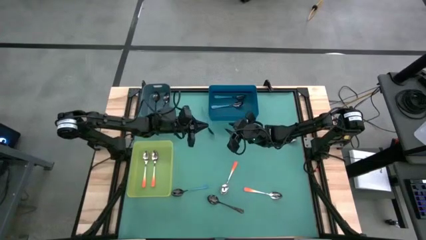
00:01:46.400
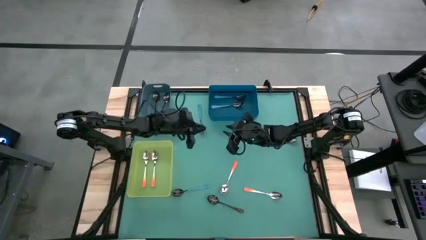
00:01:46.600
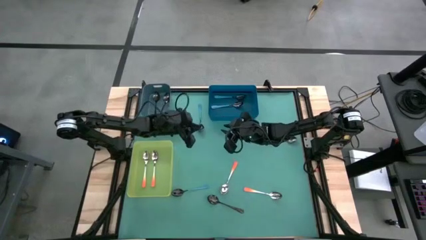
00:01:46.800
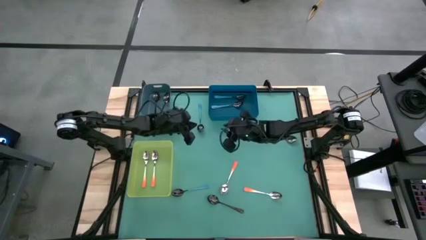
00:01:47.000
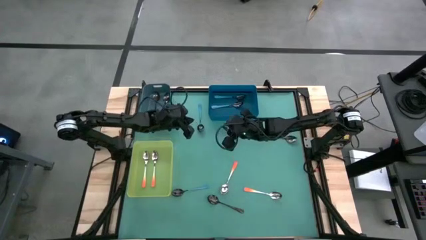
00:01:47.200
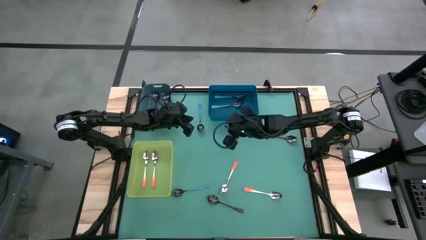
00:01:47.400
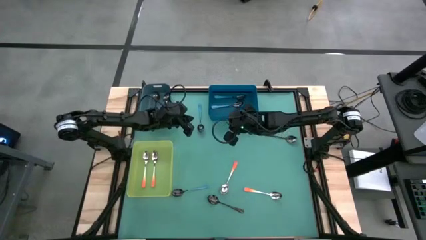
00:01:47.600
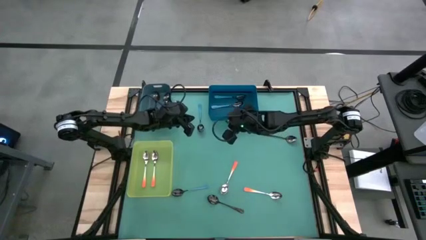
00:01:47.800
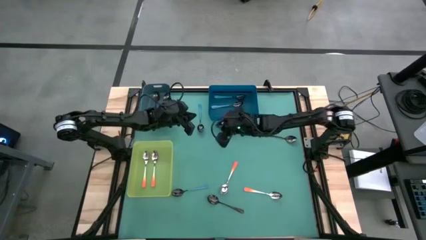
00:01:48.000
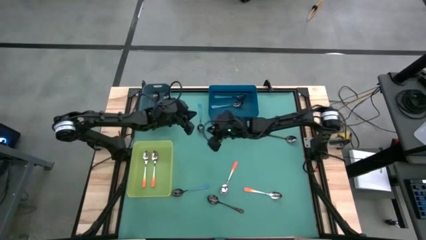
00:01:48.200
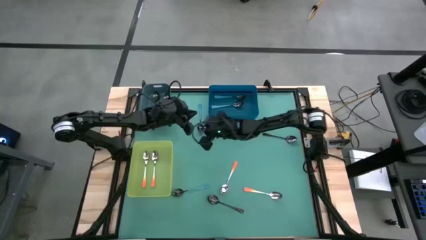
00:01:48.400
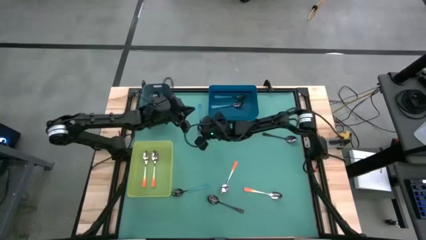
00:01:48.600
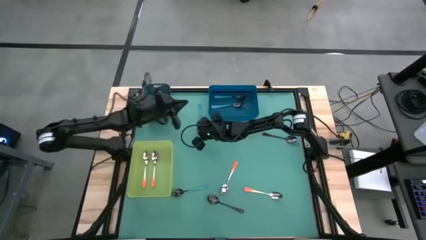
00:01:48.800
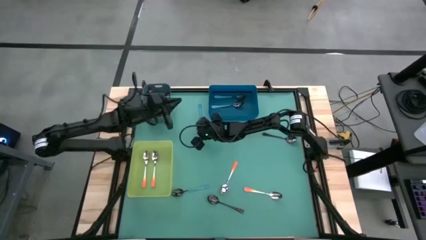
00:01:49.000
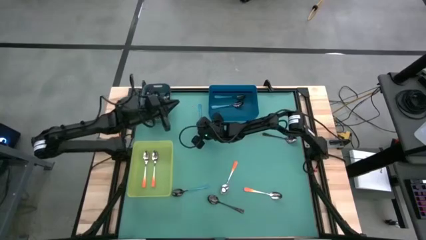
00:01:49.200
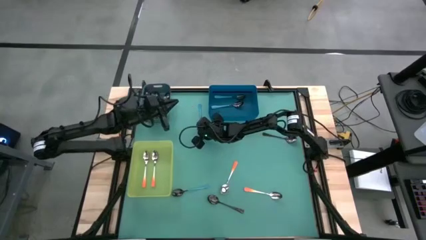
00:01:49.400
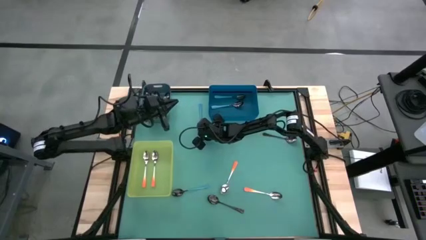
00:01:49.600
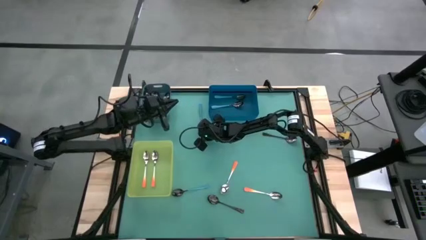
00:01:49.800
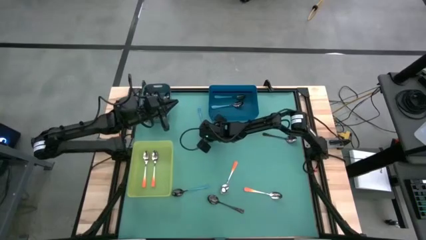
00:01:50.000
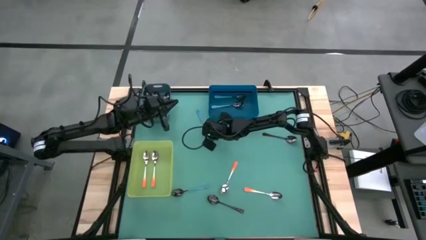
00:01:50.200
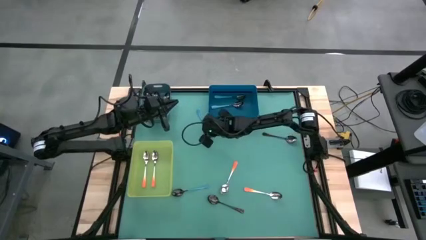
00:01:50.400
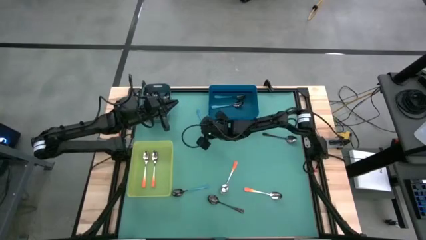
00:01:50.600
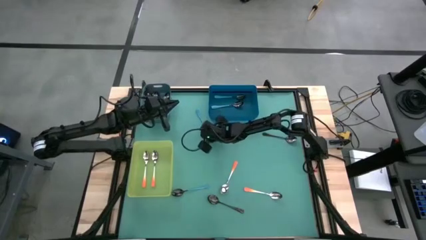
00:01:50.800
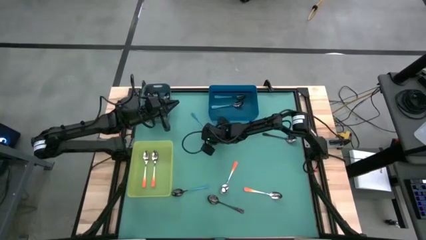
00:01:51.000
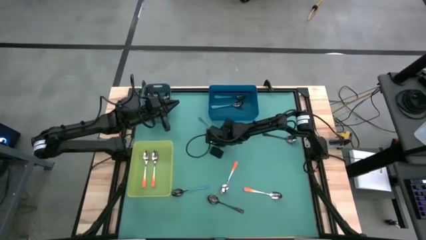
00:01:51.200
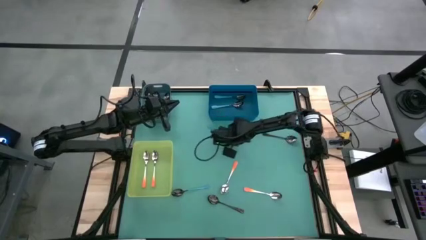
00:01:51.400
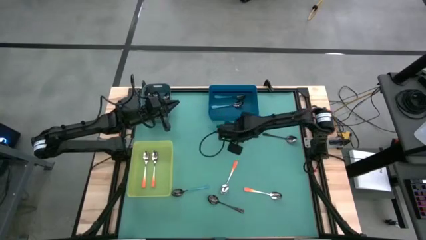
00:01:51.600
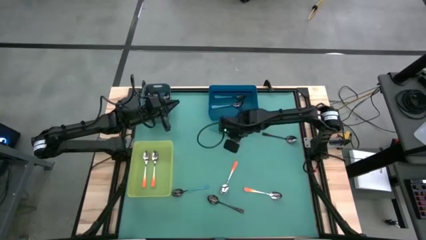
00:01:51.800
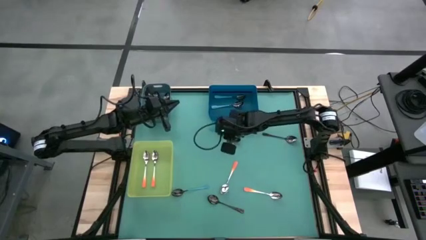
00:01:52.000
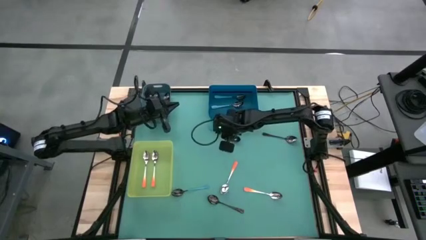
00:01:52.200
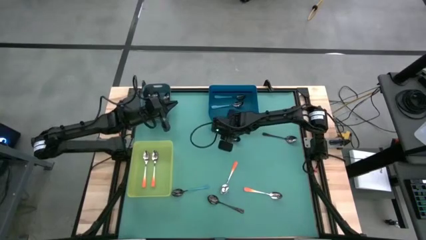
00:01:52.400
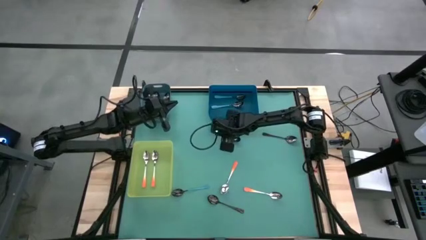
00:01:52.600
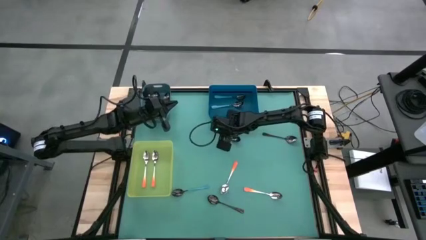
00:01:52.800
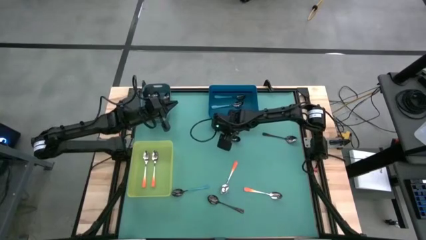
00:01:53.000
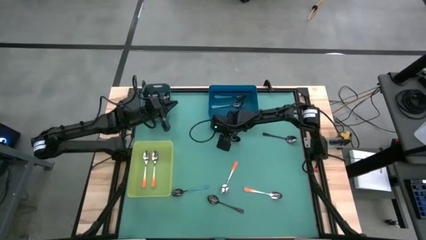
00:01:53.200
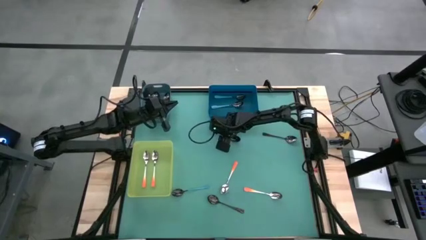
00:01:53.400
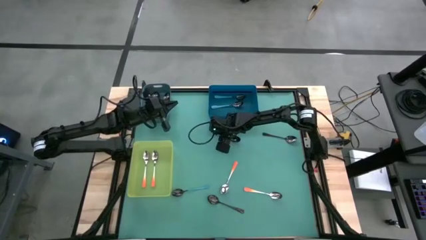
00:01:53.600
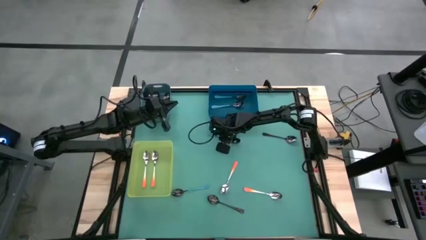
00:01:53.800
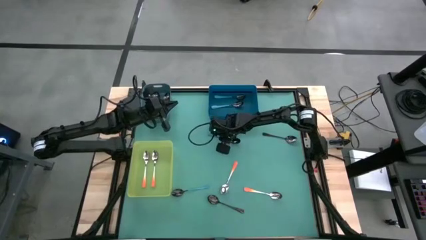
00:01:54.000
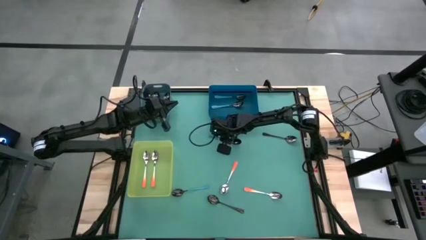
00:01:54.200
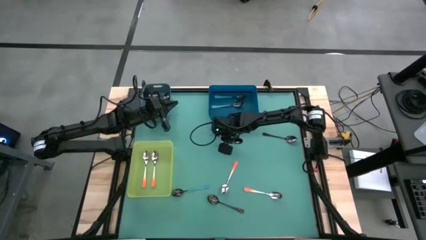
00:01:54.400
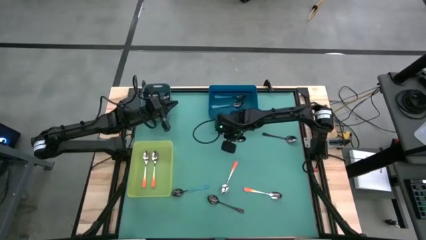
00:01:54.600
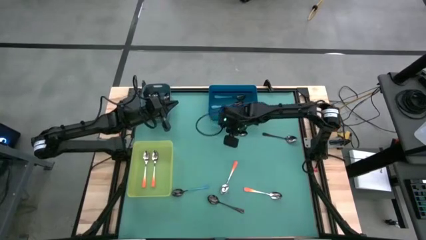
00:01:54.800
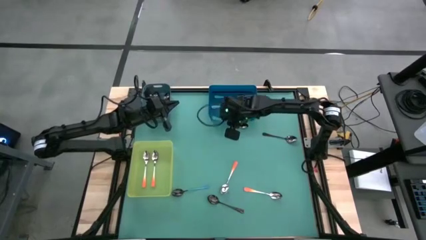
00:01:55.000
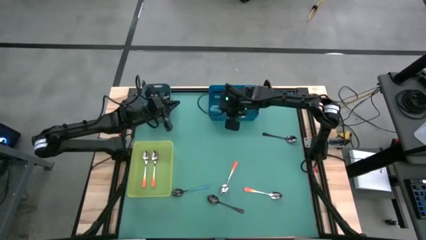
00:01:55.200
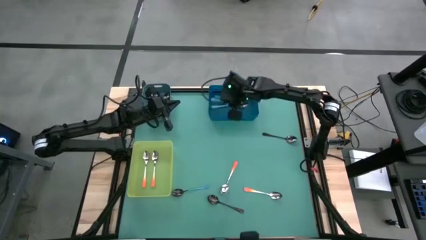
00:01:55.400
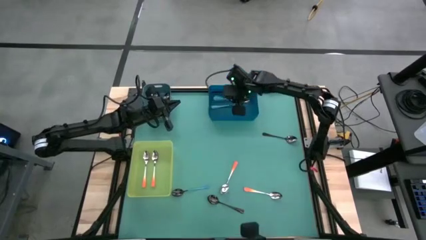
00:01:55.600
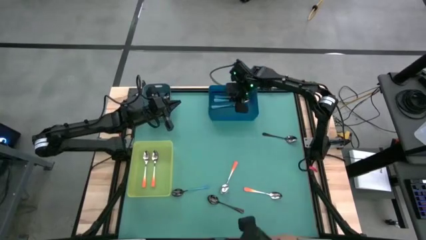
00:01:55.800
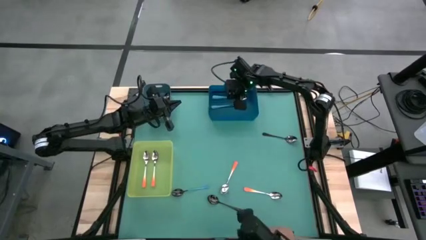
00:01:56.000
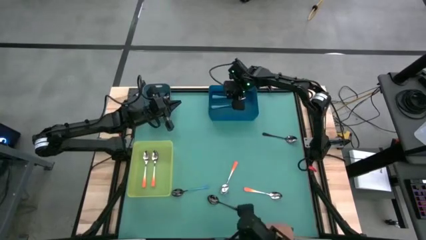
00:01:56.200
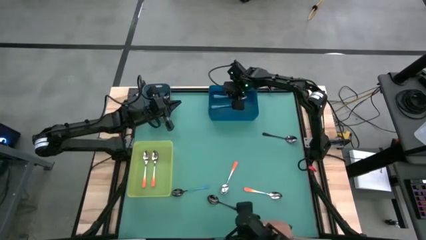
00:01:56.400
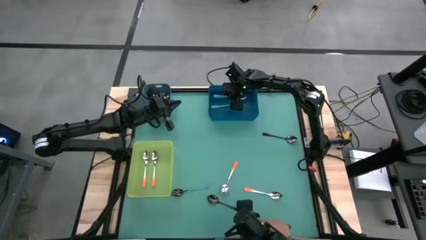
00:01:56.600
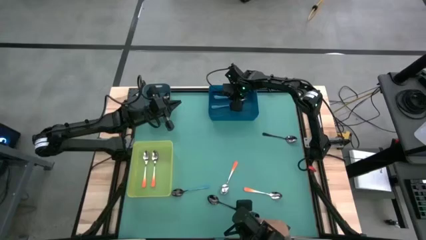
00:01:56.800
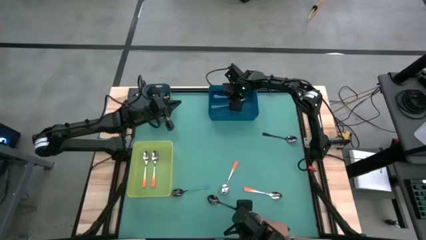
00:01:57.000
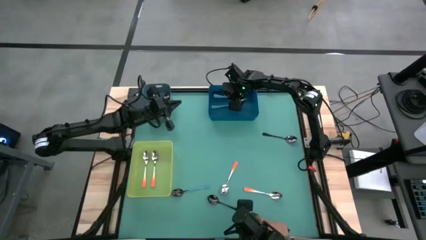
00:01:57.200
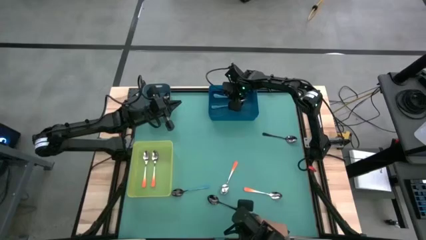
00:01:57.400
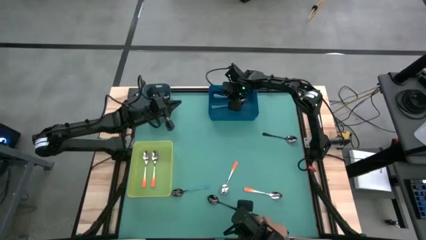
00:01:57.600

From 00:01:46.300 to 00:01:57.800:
Task: Sort silverware by color (type)
Put the blue spoon into the dark blue bin
